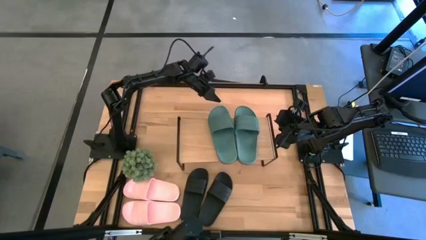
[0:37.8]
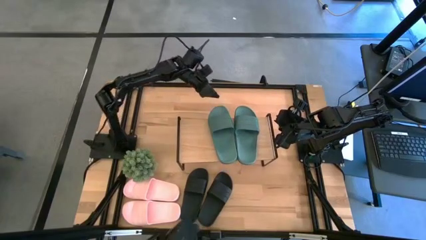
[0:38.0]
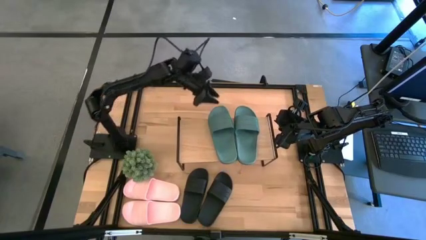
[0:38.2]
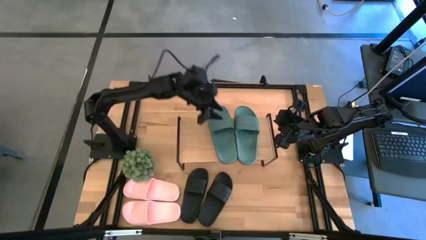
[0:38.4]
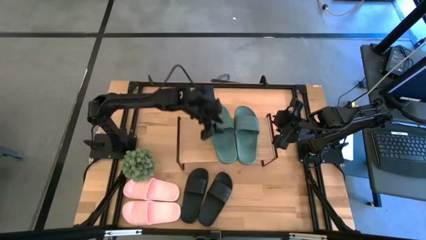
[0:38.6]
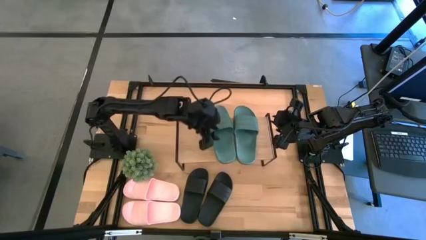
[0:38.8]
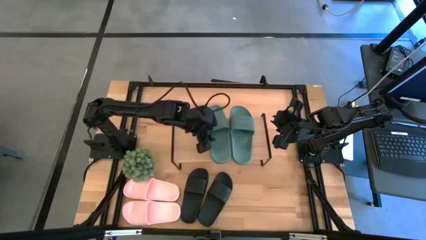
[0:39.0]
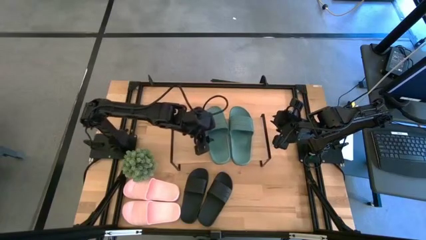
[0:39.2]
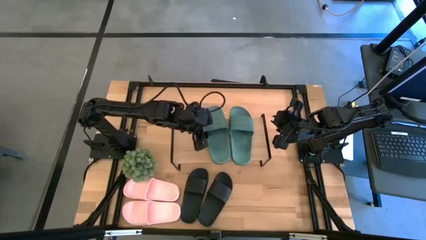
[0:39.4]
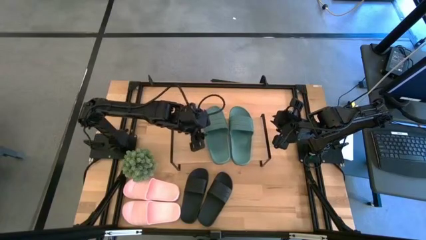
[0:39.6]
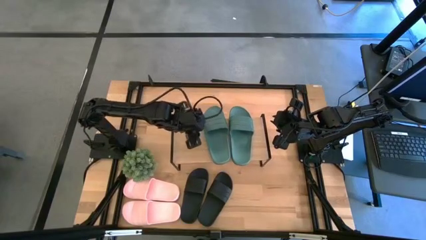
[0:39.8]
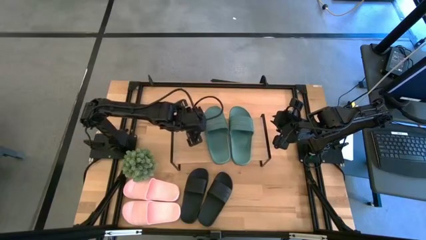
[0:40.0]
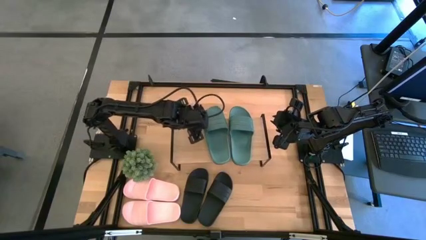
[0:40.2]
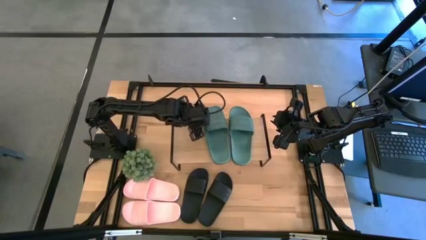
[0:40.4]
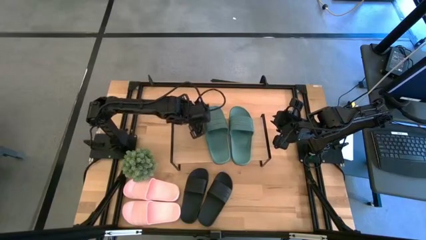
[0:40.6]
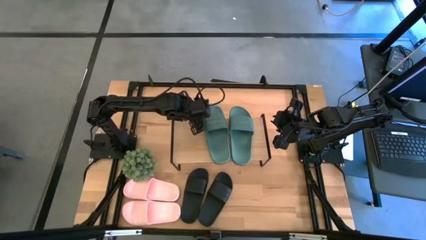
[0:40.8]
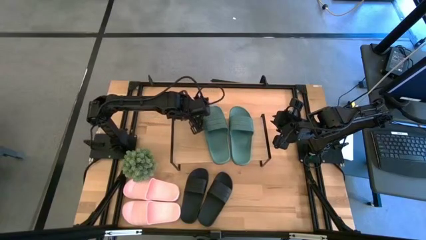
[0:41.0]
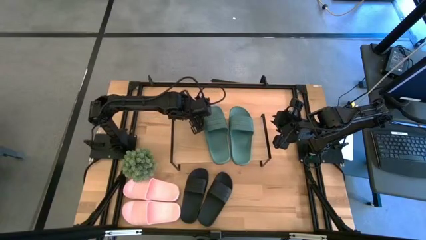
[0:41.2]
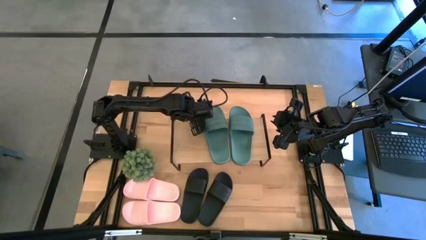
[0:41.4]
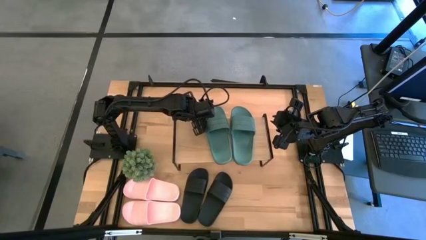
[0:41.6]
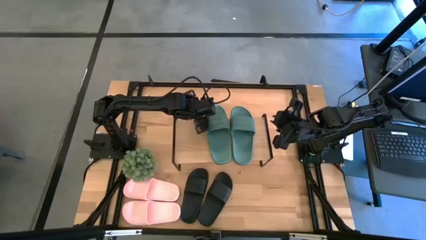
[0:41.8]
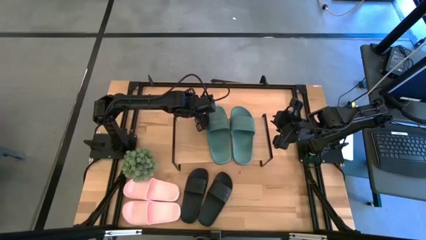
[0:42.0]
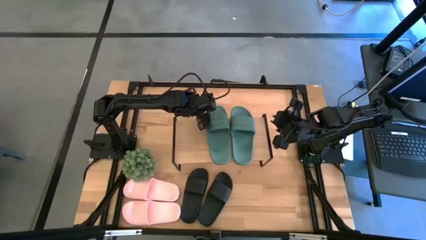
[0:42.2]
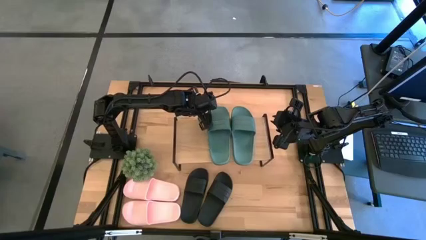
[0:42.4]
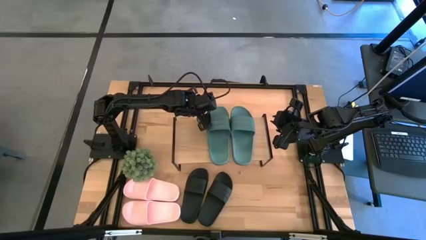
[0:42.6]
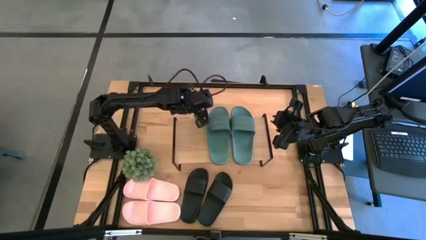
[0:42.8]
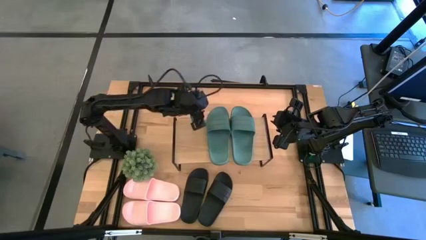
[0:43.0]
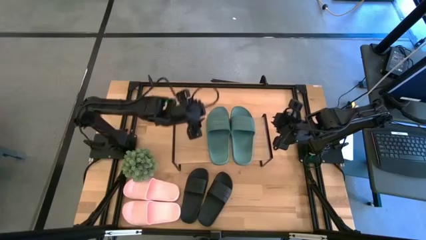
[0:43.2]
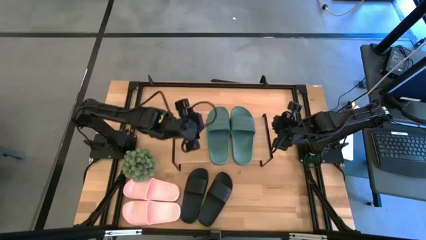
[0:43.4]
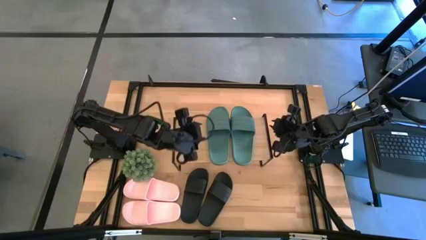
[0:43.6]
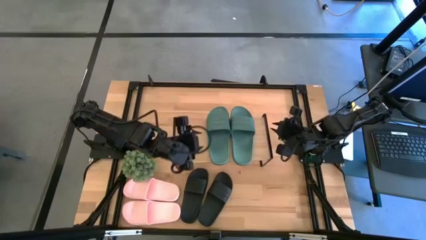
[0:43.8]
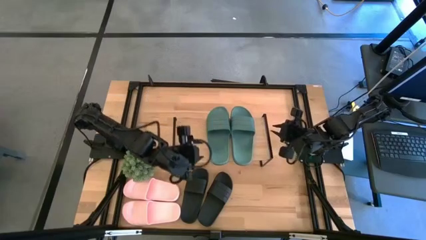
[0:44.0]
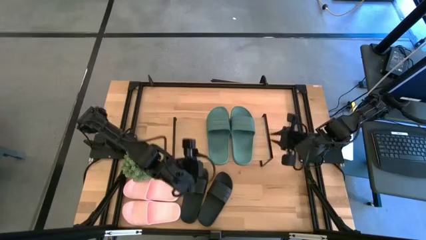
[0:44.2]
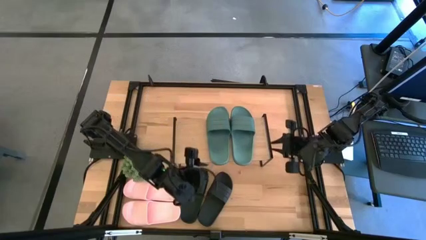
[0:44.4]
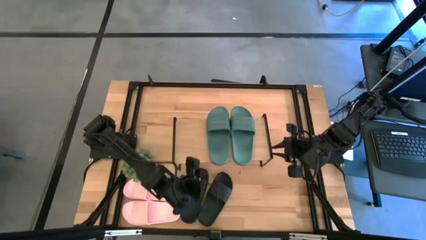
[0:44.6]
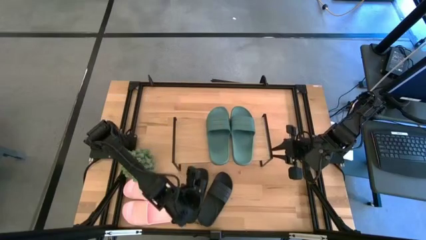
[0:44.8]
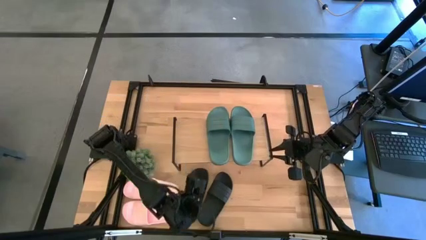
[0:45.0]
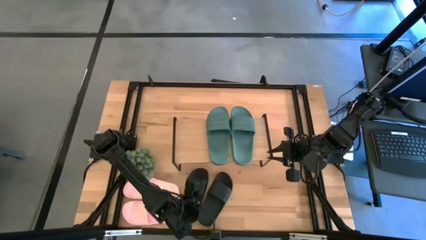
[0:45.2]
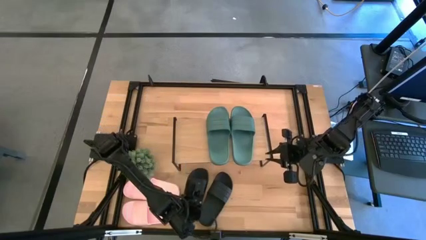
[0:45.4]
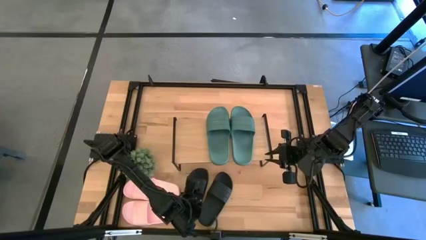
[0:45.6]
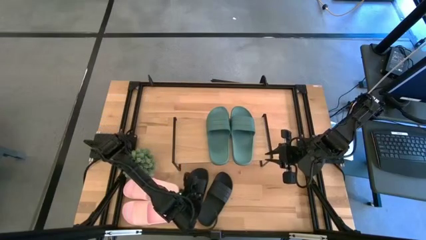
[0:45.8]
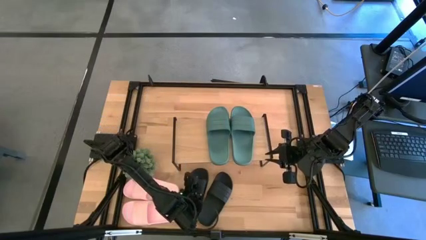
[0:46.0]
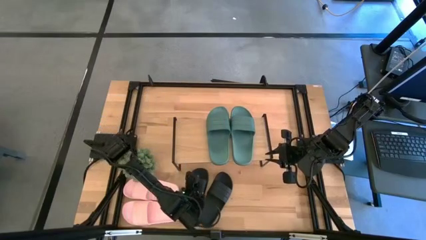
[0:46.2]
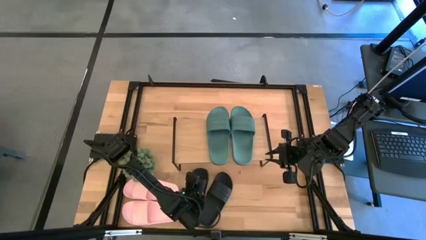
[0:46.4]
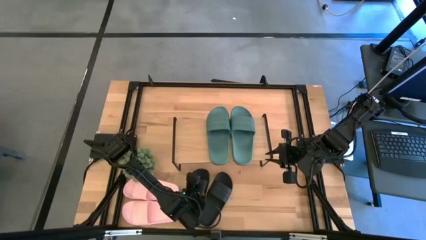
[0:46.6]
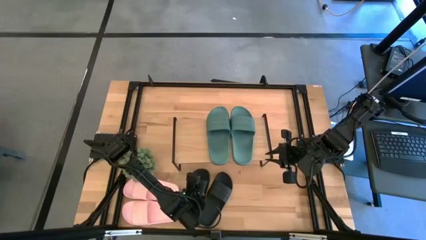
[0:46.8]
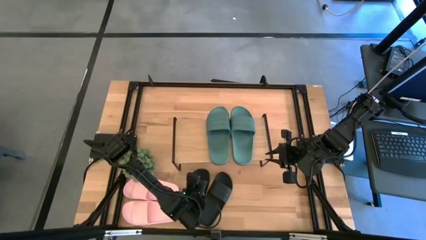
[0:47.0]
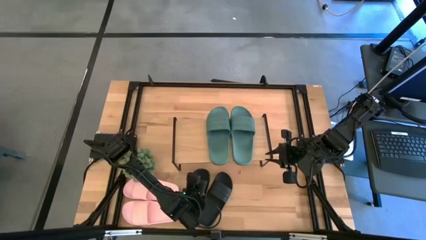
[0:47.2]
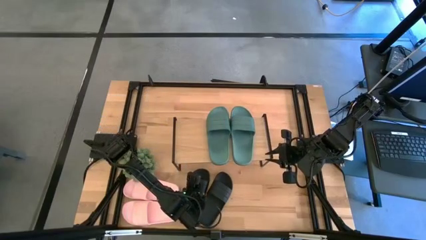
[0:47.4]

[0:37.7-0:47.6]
Task: Pick and place slides into the shelf
Put the left black slipper under the shelf

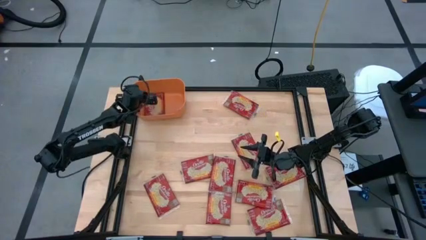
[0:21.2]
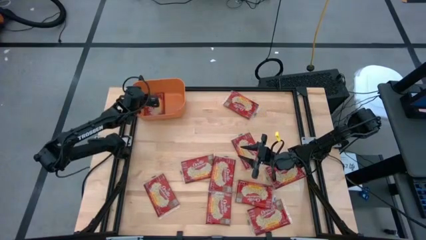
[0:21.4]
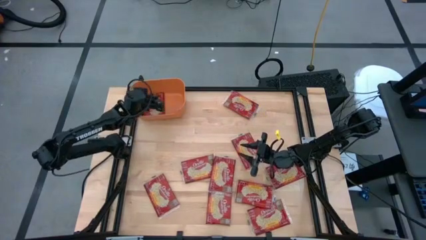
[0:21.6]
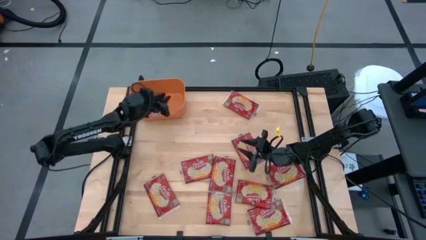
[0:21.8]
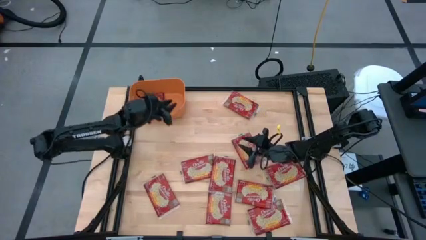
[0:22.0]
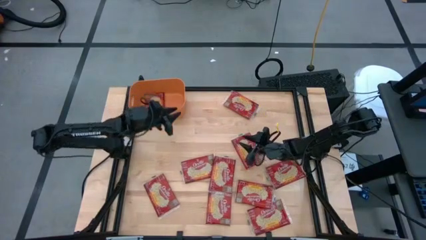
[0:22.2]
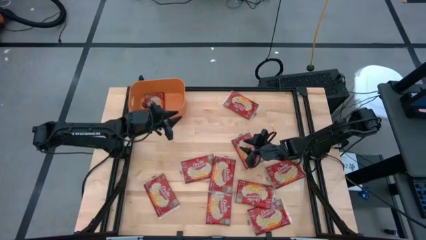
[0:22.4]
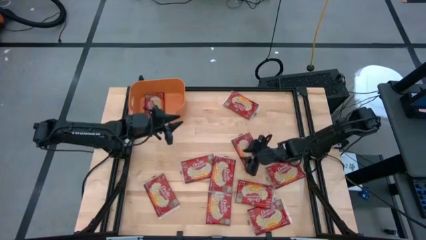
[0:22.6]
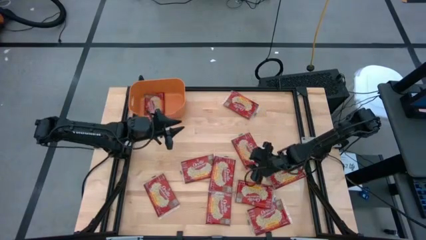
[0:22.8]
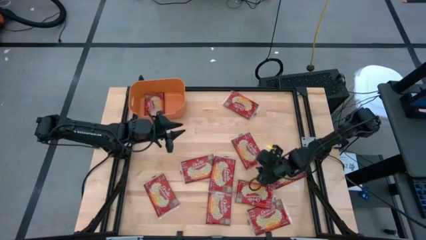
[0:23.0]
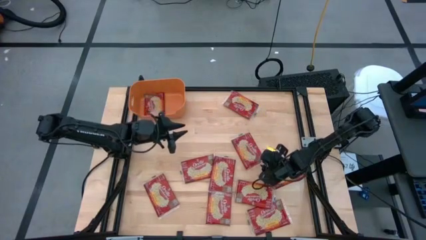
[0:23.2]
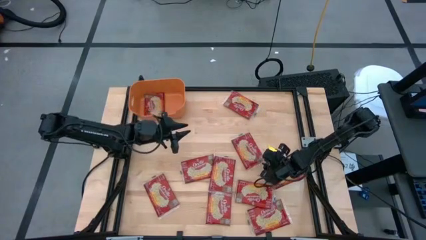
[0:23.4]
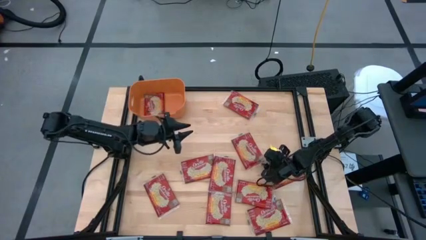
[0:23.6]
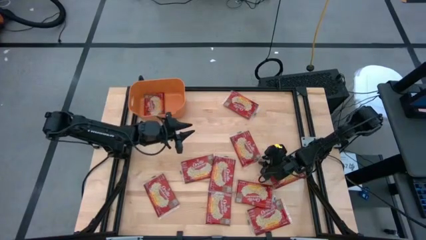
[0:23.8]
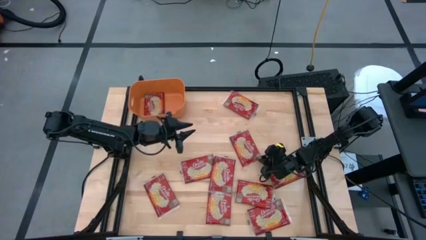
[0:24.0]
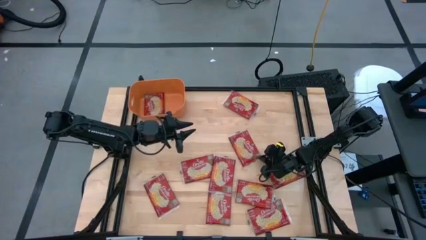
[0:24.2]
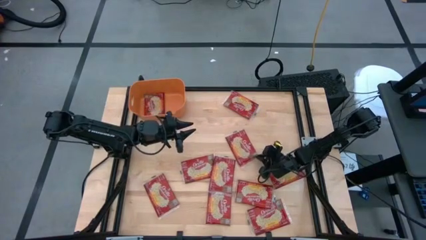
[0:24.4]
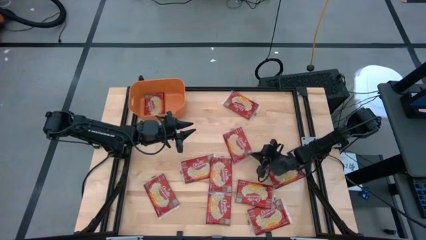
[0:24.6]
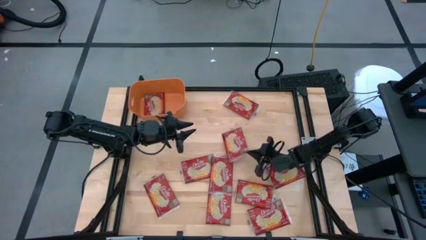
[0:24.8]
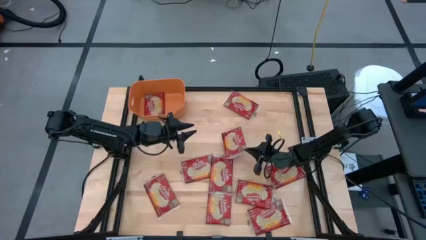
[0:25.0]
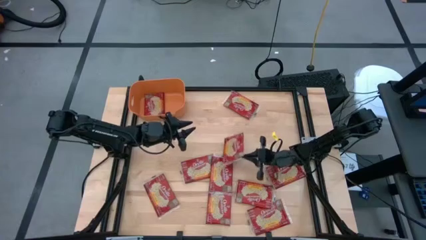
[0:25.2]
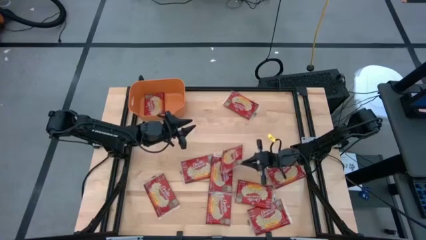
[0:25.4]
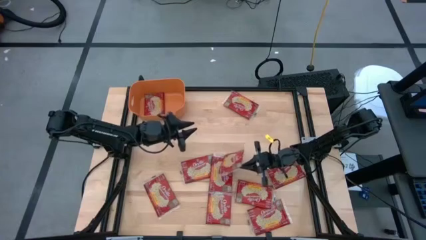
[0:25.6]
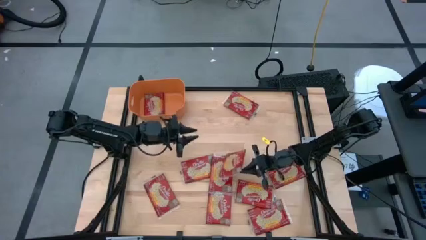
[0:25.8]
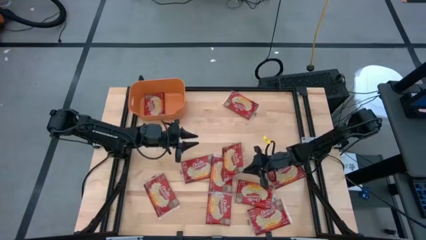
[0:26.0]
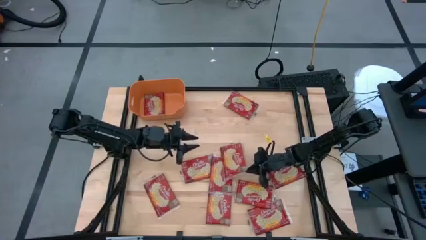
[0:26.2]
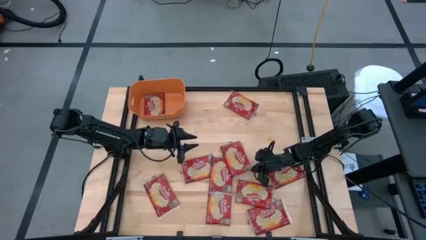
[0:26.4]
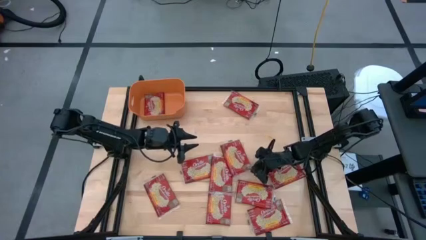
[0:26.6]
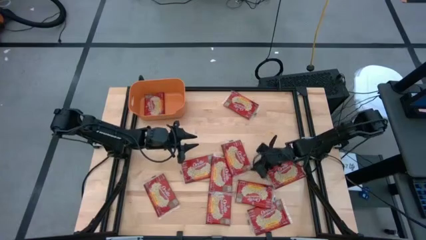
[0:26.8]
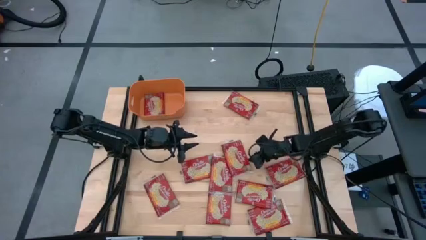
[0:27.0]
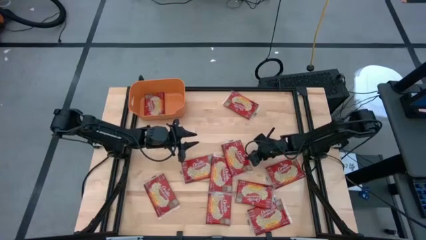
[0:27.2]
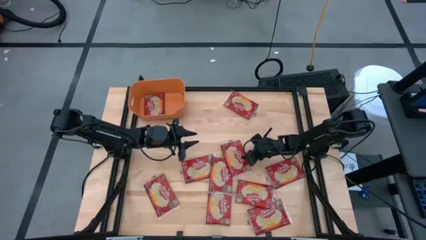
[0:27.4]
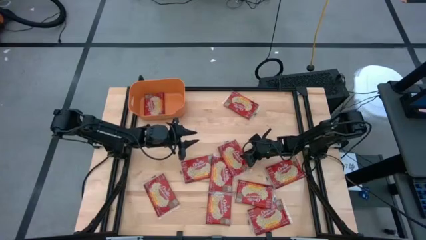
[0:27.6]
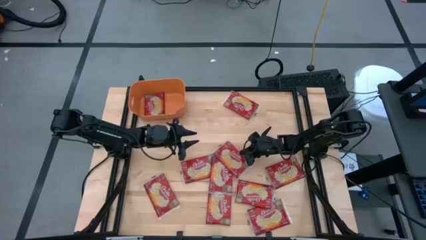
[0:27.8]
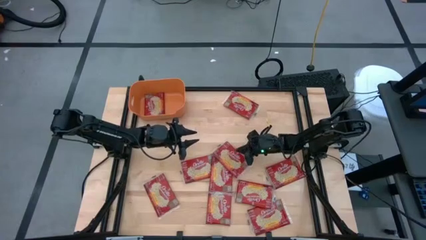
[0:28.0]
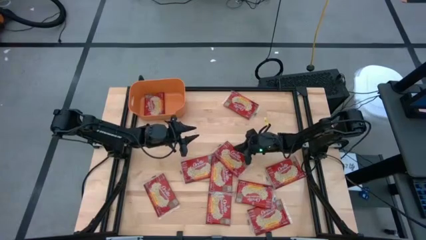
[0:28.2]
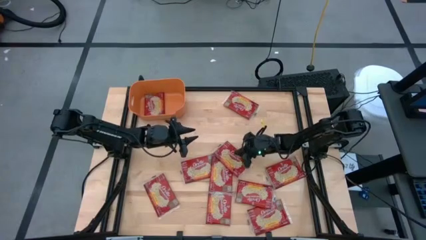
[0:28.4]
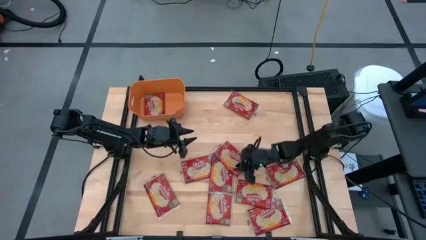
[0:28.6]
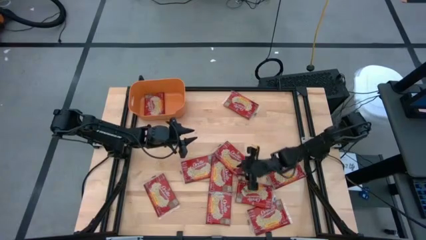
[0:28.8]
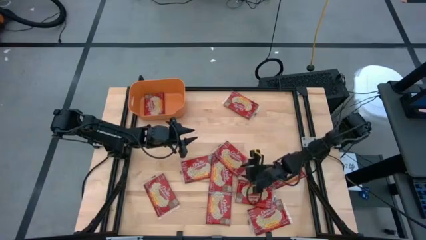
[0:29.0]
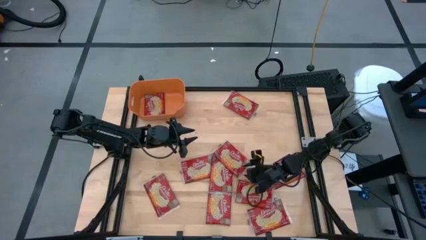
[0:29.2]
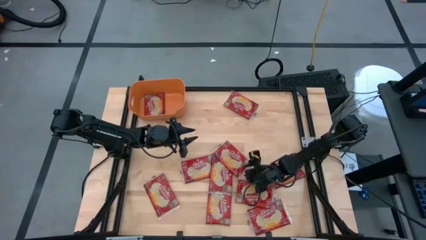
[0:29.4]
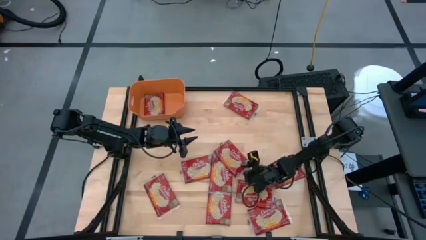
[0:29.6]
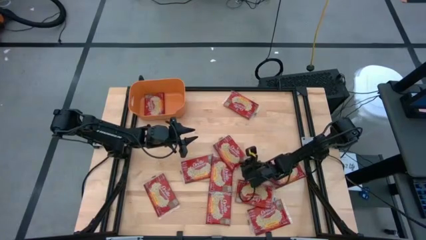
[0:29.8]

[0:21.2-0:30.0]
Task: Sort popcorn bags into baskets
Put the red popcorn bag into the orange bin
